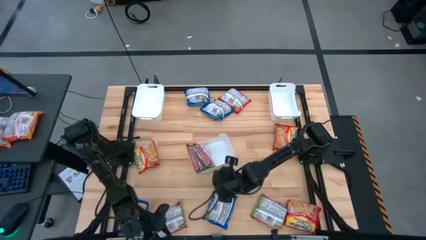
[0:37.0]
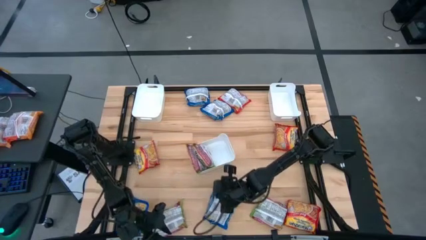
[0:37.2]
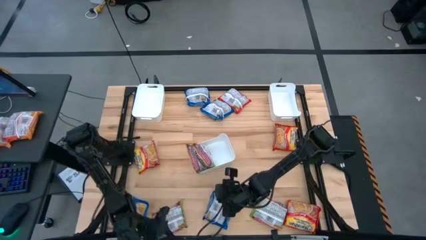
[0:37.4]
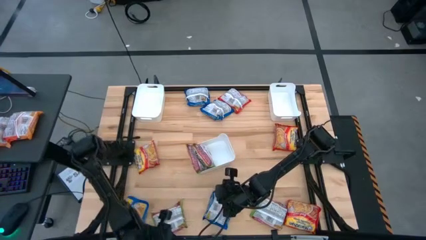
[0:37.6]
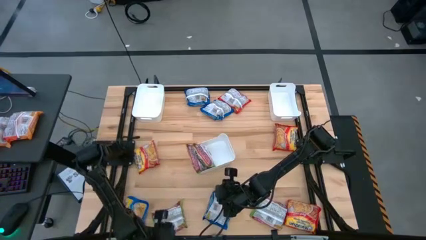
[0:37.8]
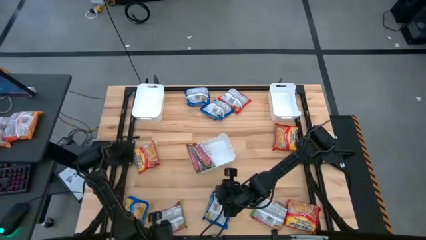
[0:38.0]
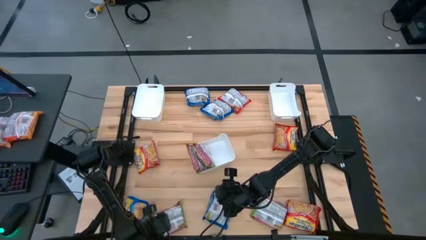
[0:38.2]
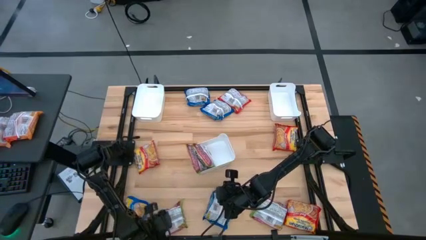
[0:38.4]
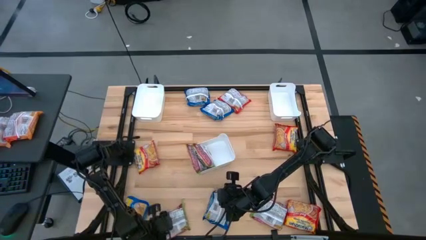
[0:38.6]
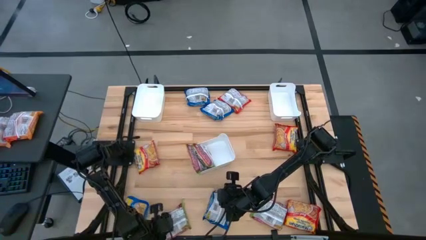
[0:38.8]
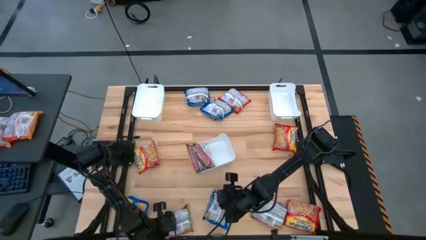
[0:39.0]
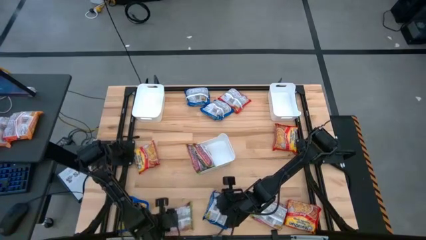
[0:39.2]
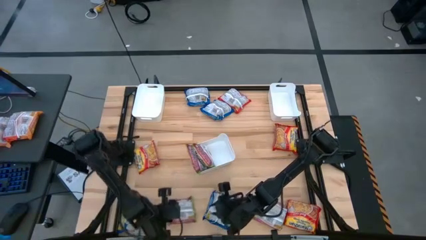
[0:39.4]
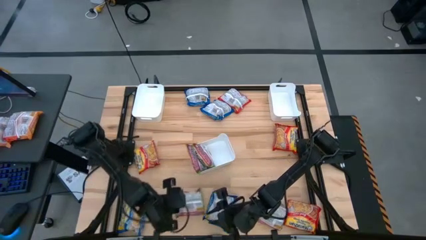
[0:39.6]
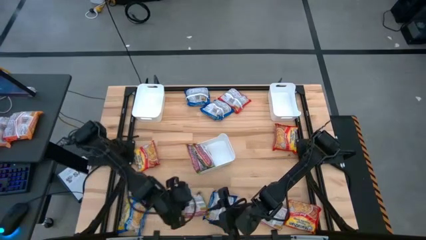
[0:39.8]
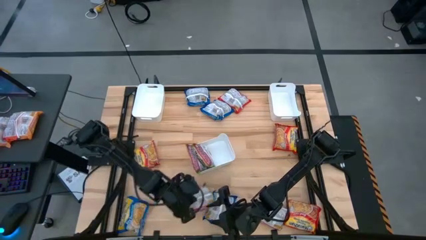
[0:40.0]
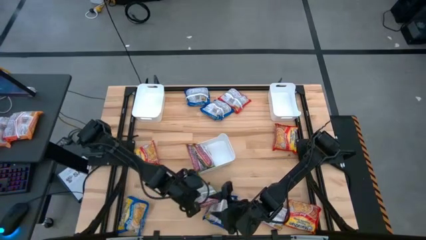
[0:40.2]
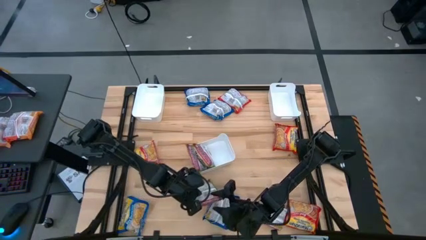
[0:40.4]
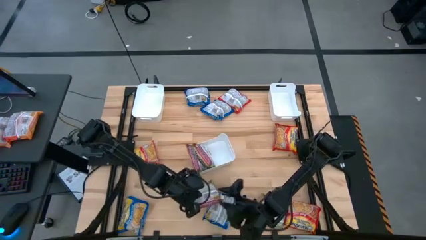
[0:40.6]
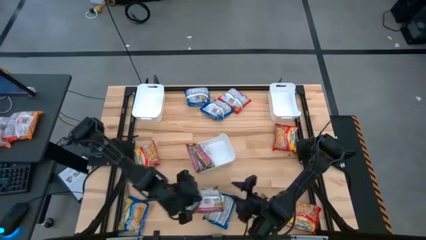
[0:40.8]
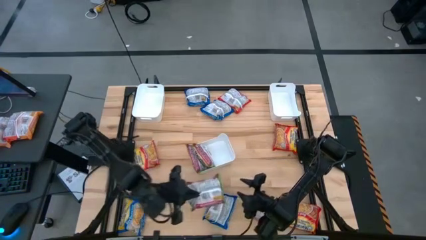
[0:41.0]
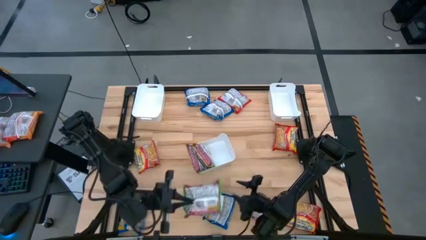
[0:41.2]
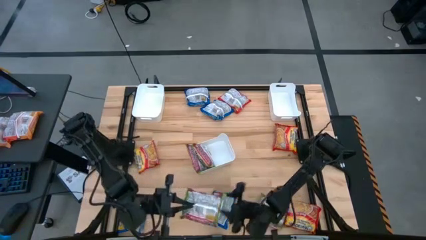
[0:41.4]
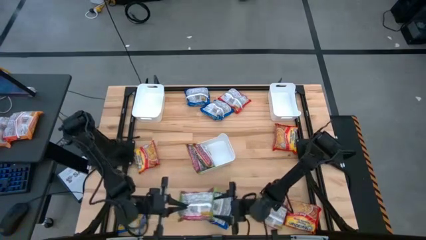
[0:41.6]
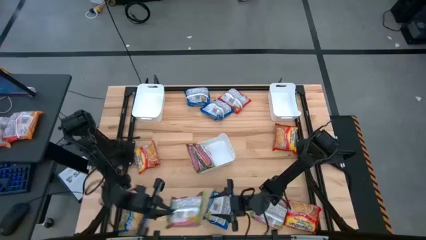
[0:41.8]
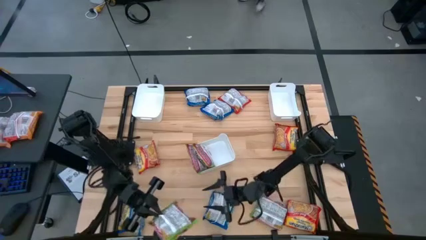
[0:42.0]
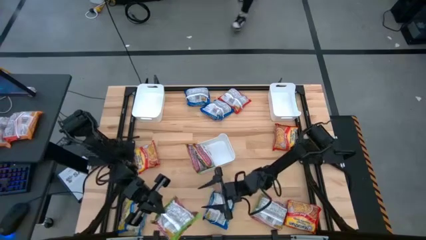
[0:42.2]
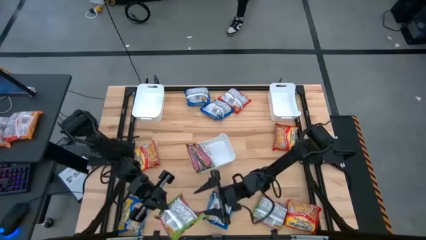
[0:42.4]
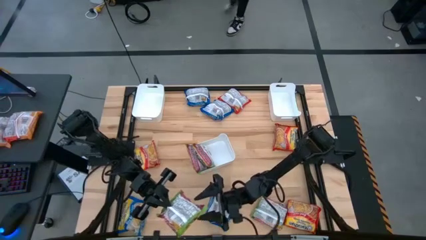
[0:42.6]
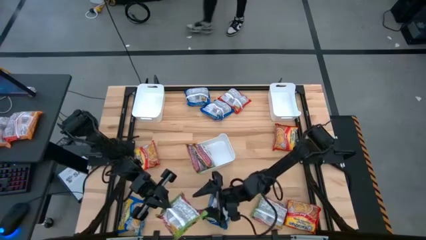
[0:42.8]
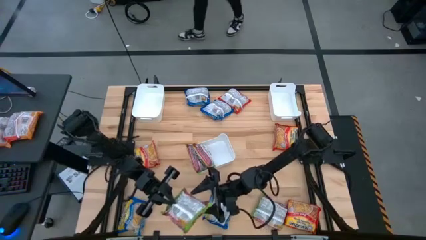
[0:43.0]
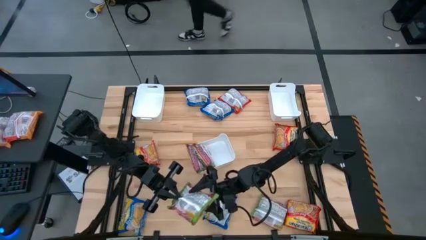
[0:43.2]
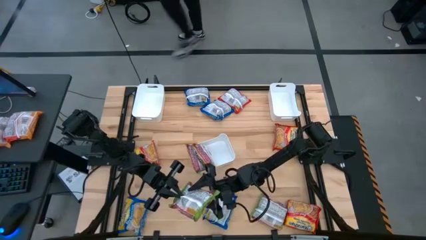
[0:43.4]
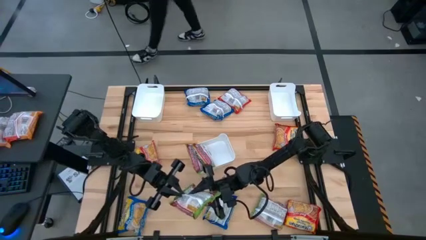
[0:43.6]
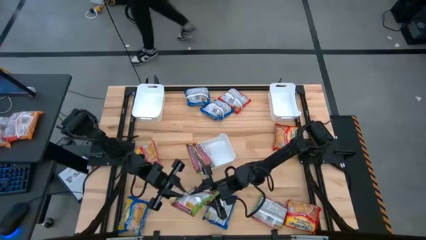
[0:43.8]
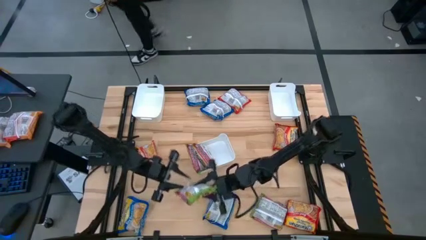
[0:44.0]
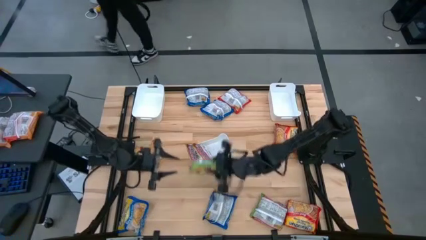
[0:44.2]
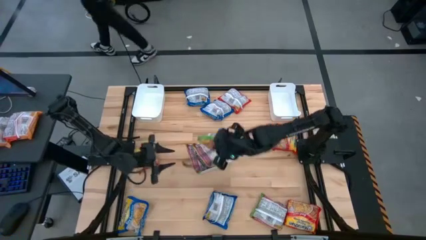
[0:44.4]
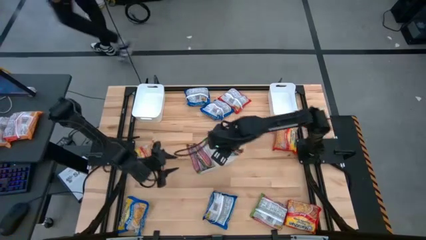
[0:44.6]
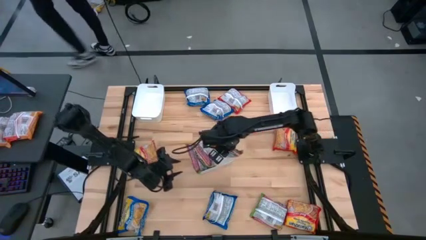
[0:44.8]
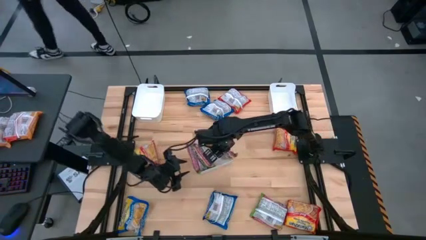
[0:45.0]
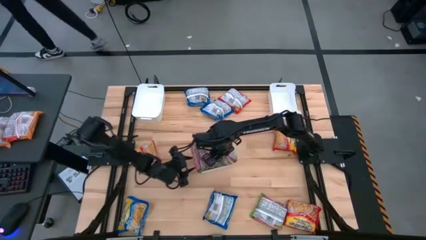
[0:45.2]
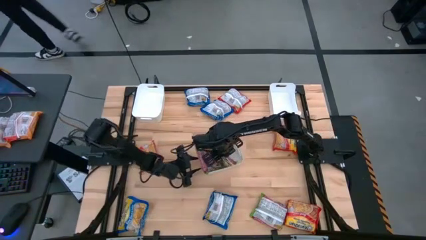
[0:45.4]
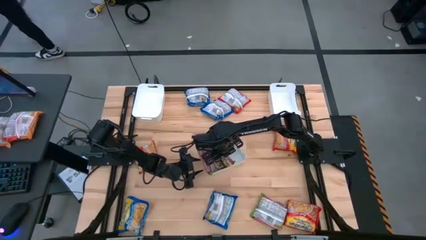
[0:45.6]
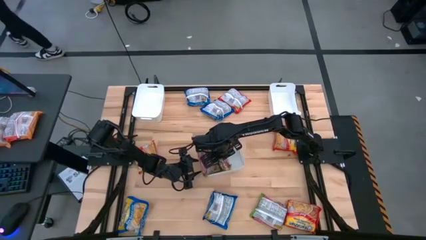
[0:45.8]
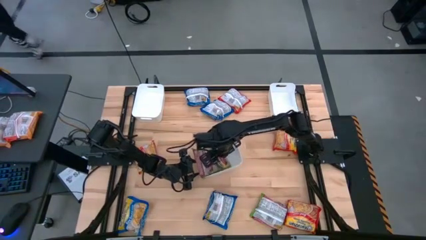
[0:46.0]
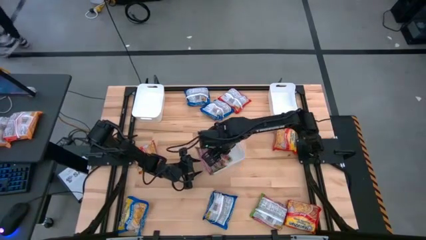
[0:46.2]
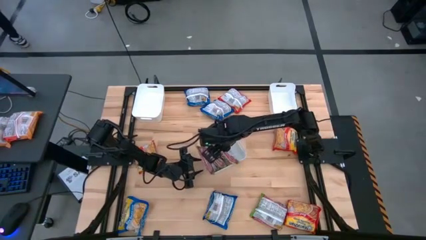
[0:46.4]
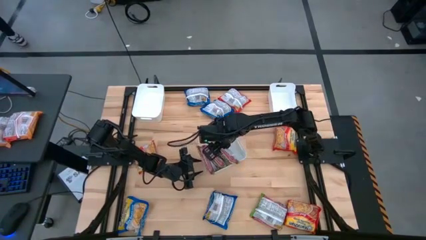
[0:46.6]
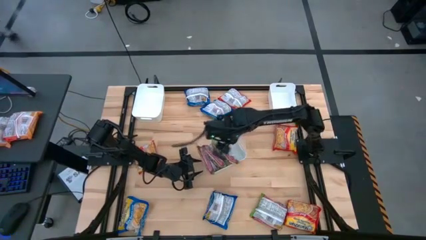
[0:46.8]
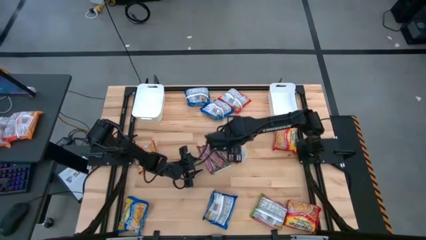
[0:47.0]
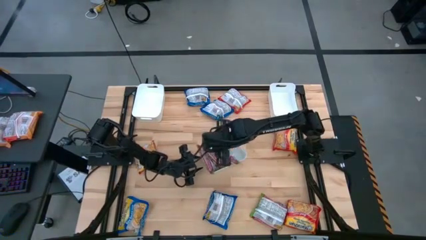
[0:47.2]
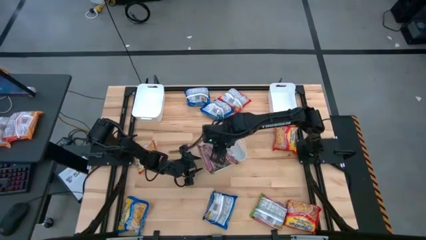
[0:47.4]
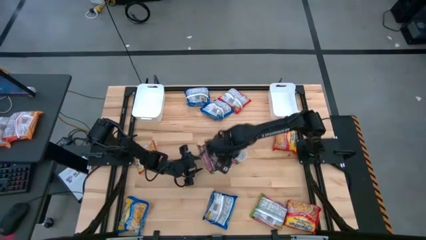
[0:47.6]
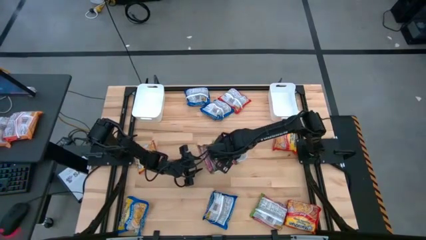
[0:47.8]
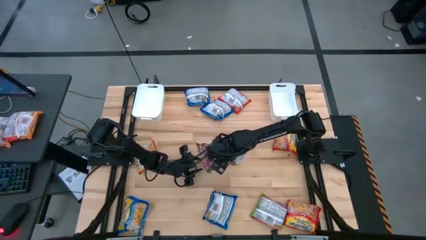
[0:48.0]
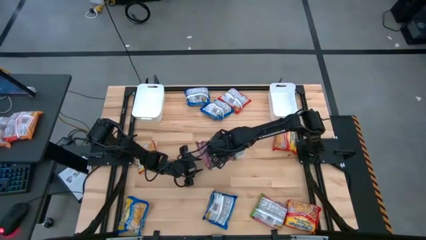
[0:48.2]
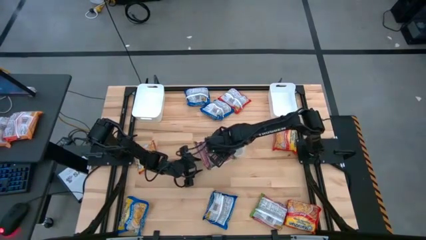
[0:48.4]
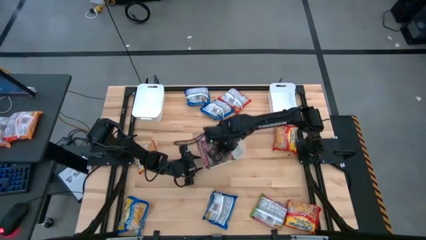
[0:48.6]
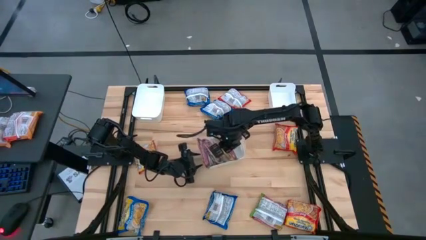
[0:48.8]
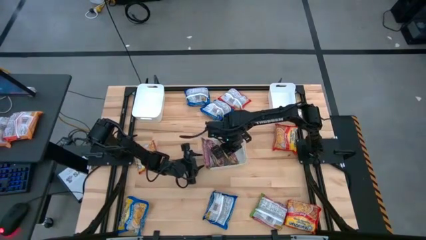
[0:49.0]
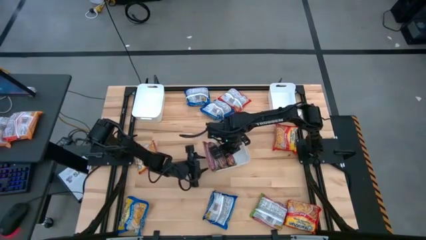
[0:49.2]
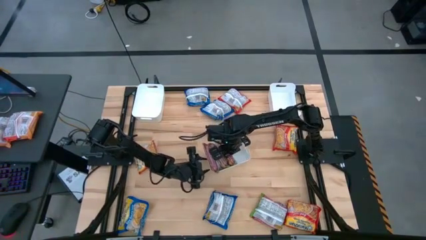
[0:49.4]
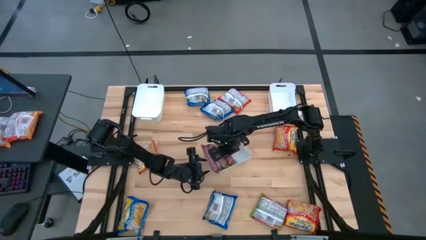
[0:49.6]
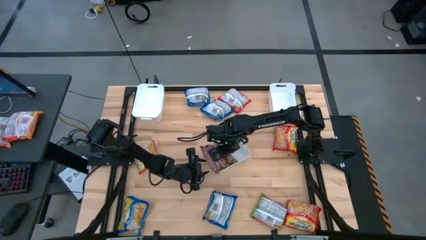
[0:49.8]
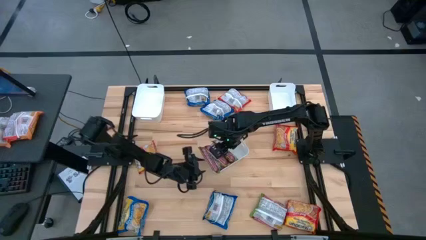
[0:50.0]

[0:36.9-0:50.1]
Task: Sort Maruchan noodles
Put the green noodle pack into the bottom white bin
